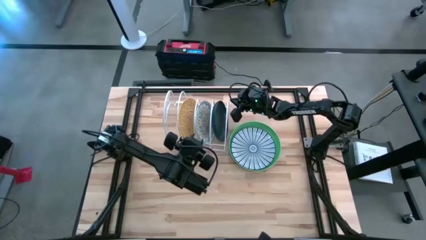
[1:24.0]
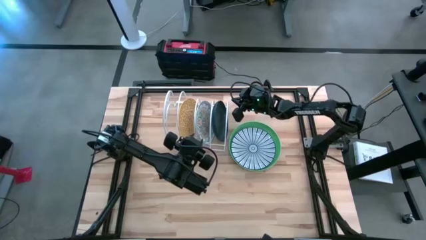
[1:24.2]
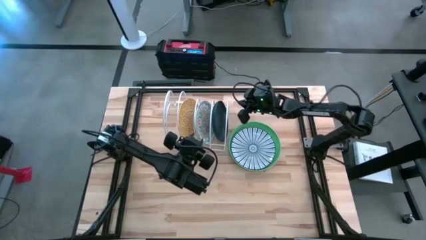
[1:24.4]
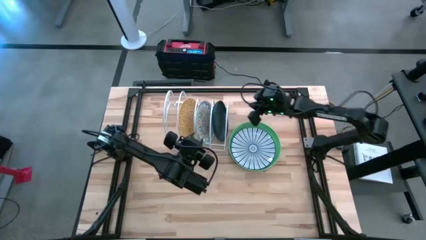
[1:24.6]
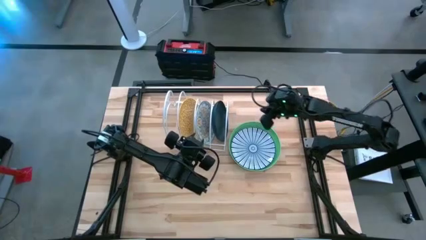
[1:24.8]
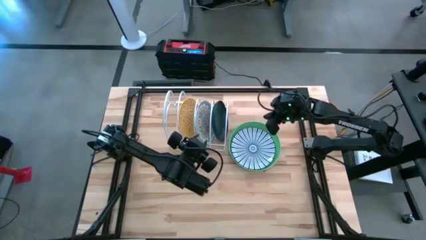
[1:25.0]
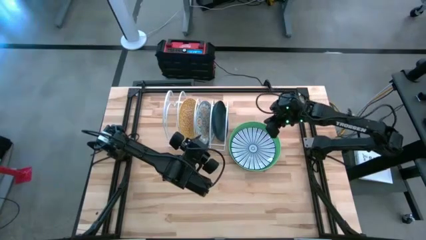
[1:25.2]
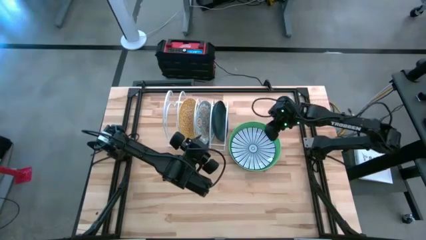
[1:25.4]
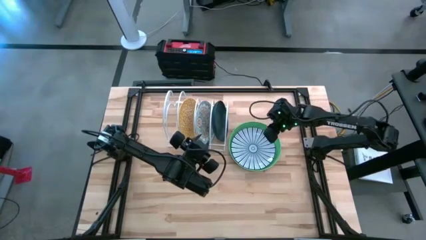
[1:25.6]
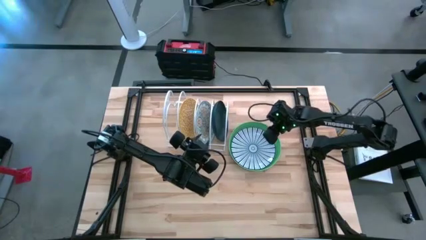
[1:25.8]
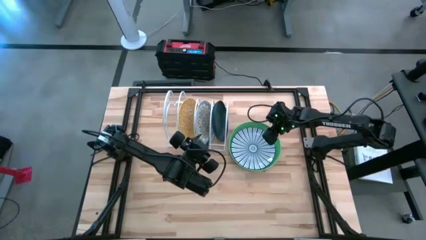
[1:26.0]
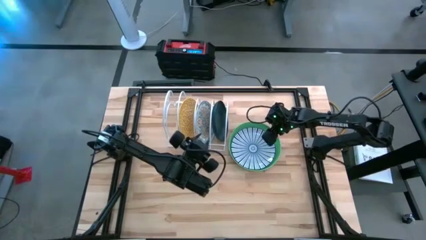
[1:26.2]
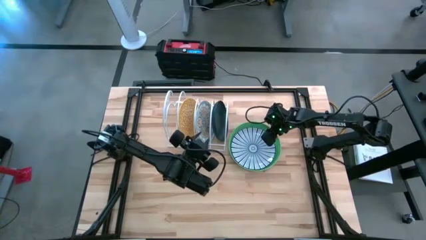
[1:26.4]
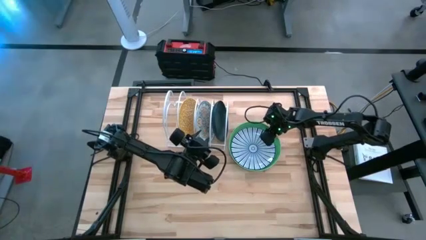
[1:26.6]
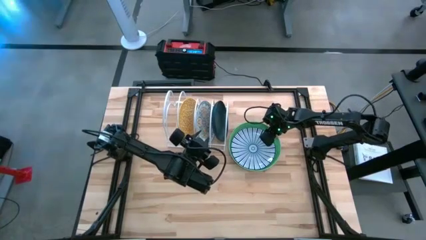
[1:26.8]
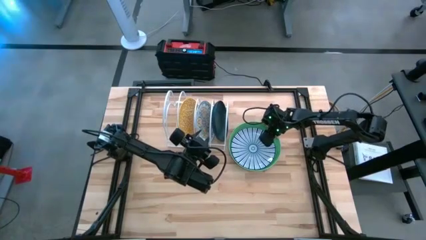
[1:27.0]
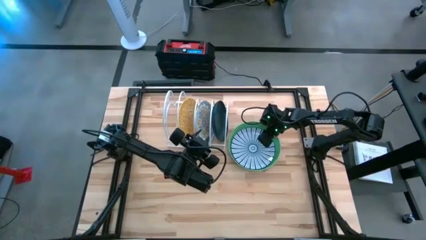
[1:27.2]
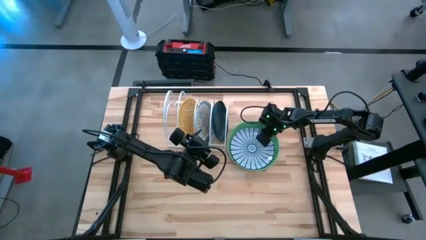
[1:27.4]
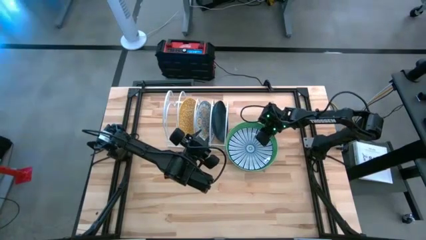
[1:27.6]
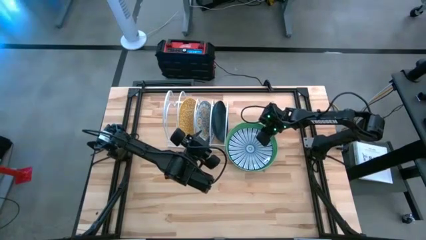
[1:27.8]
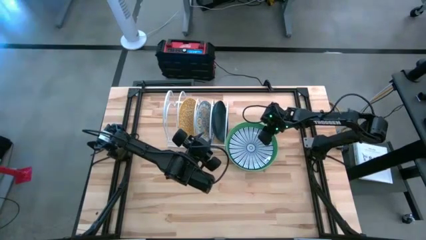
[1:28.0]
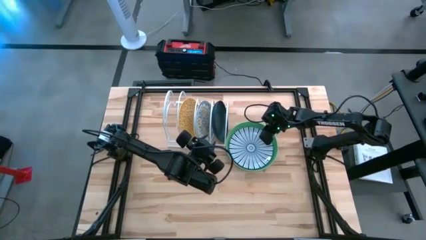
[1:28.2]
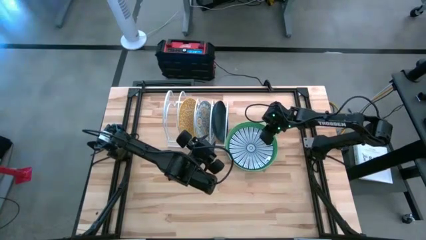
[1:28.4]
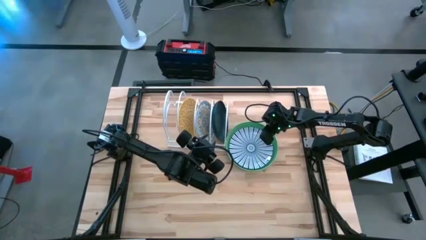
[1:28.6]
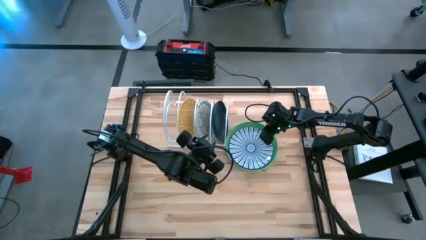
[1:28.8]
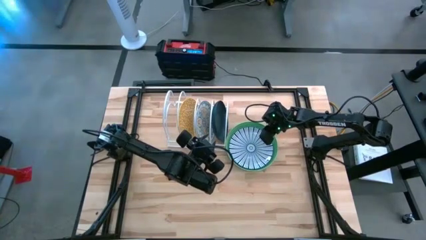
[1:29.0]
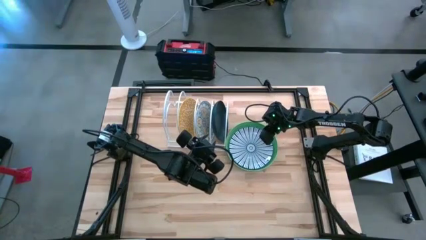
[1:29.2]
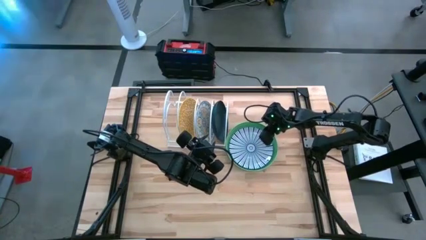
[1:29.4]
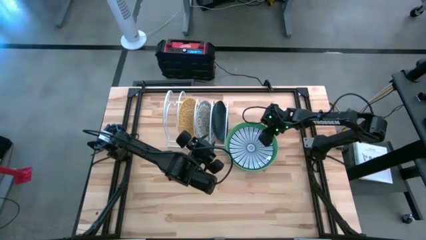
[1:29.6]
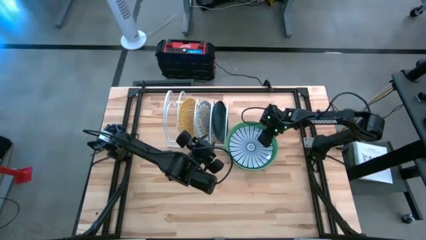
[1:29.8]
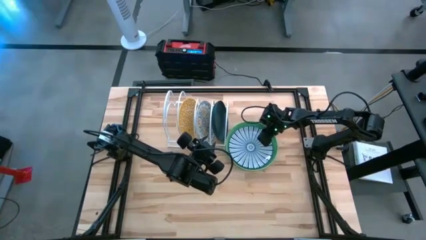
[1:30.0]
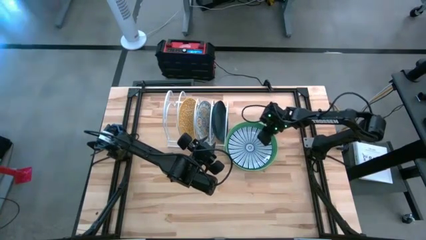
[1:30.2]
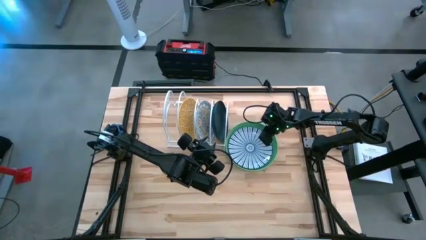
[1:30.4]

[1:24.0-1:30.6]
Task: Sort dishes
Put the blue plate in the dish rack

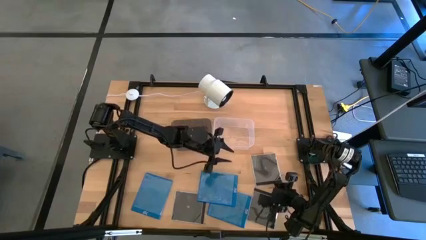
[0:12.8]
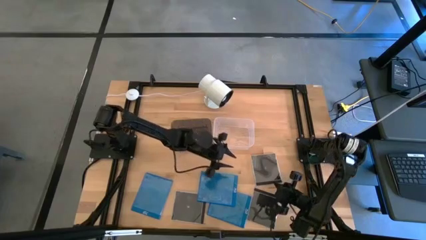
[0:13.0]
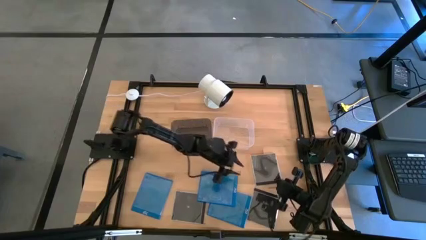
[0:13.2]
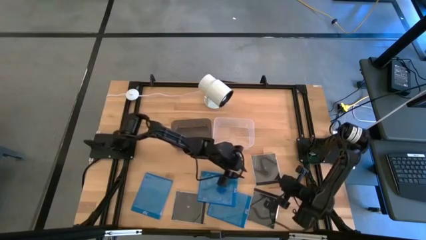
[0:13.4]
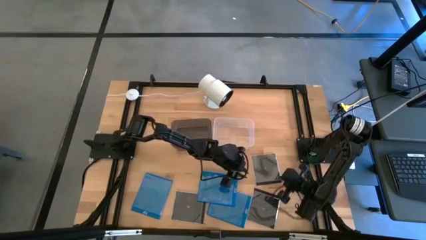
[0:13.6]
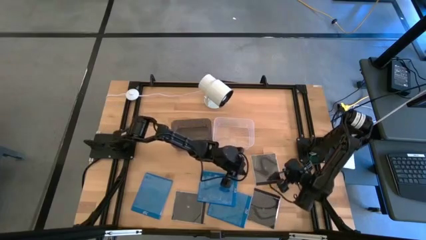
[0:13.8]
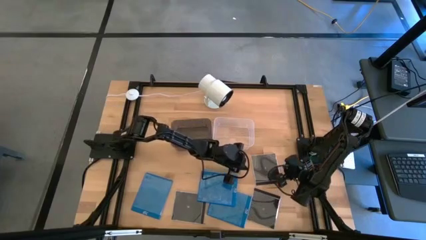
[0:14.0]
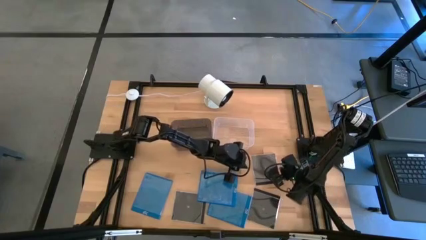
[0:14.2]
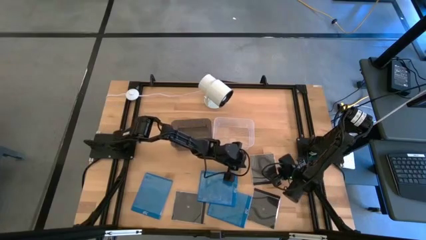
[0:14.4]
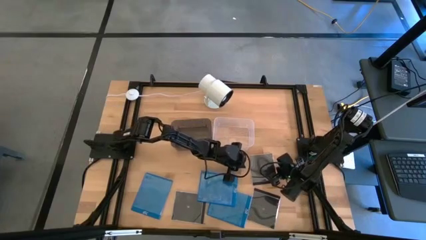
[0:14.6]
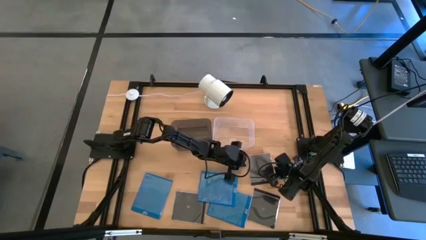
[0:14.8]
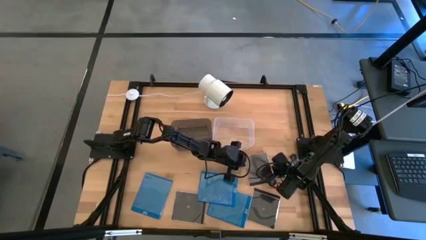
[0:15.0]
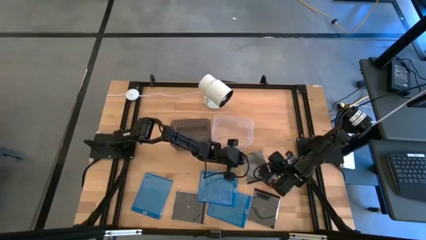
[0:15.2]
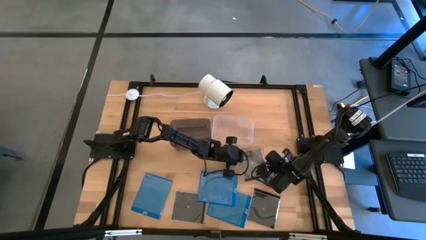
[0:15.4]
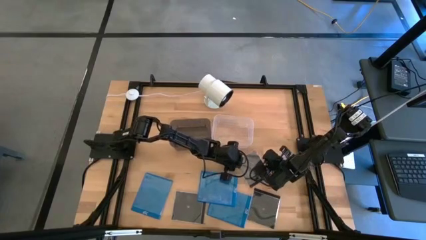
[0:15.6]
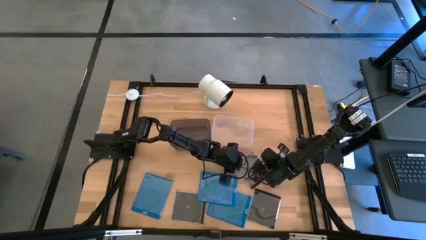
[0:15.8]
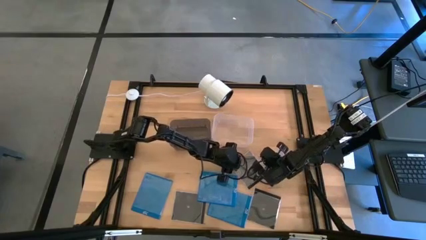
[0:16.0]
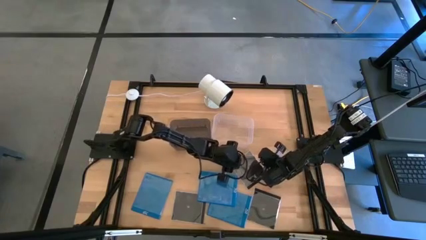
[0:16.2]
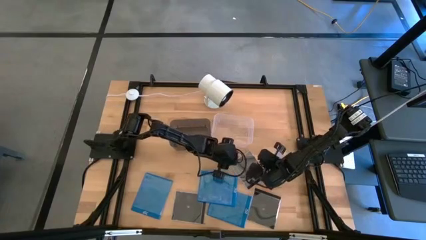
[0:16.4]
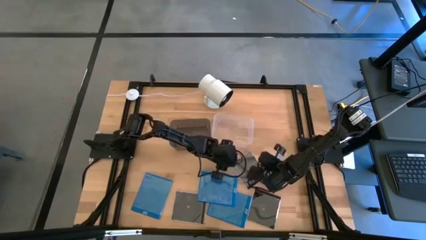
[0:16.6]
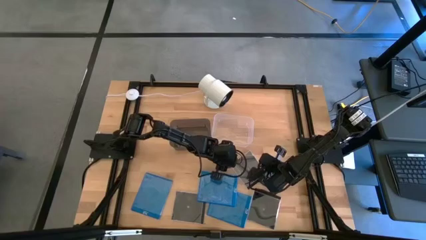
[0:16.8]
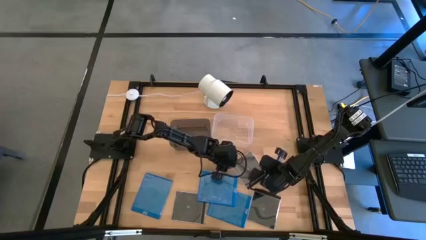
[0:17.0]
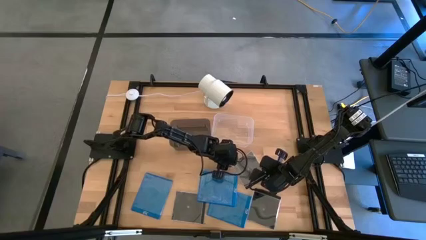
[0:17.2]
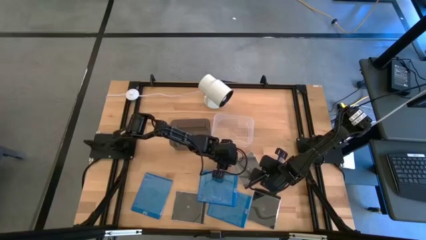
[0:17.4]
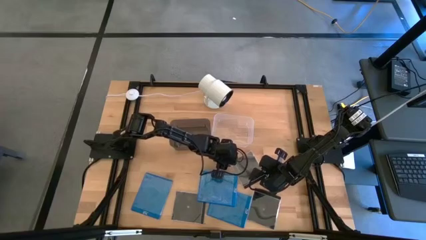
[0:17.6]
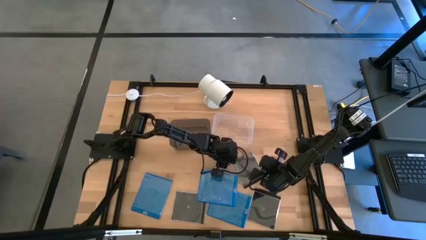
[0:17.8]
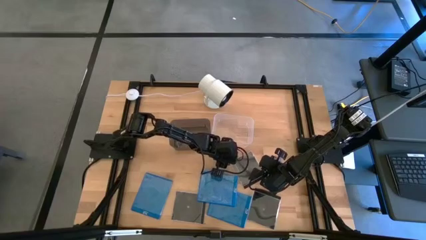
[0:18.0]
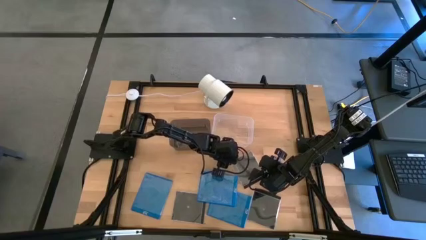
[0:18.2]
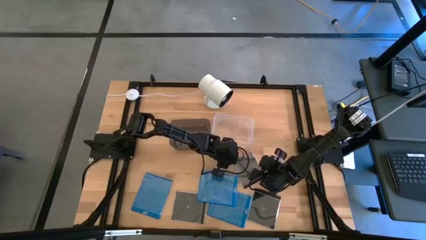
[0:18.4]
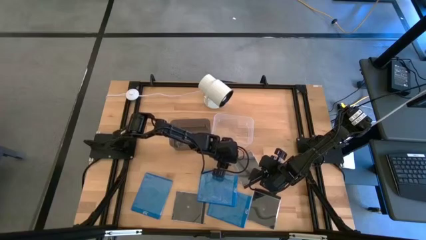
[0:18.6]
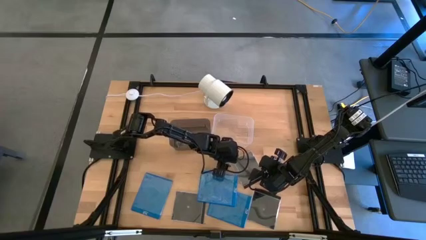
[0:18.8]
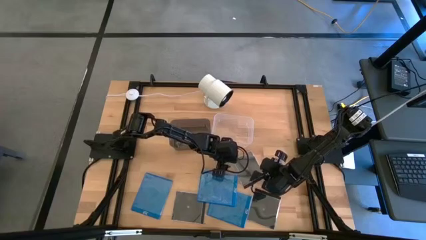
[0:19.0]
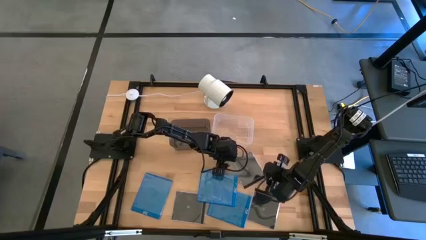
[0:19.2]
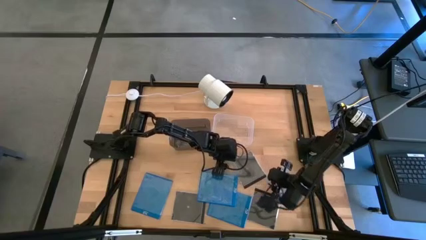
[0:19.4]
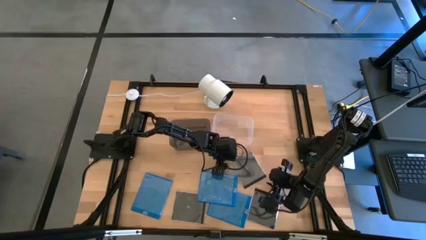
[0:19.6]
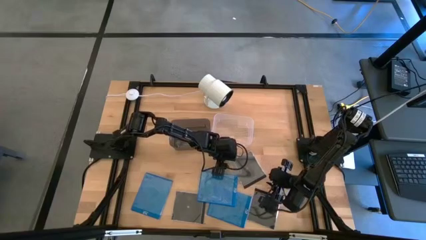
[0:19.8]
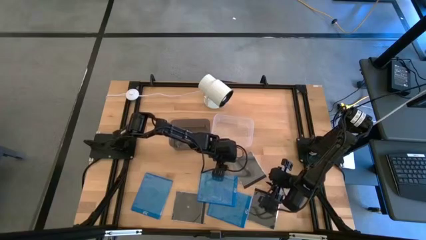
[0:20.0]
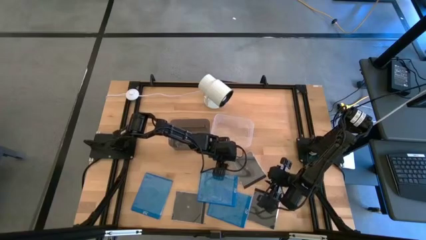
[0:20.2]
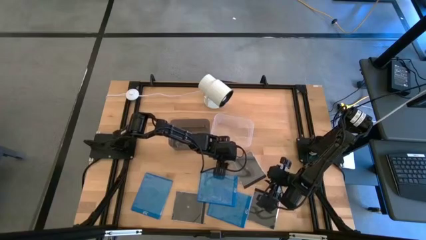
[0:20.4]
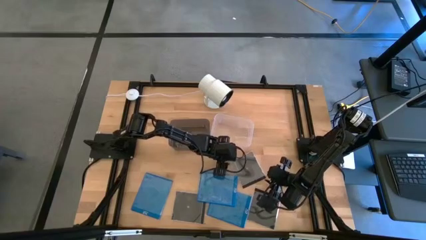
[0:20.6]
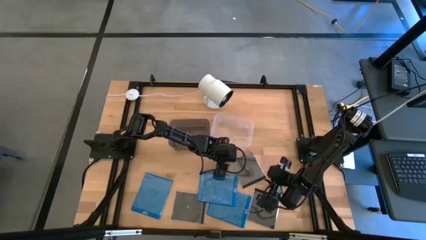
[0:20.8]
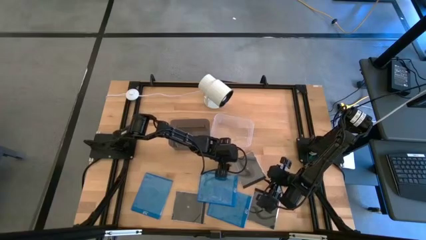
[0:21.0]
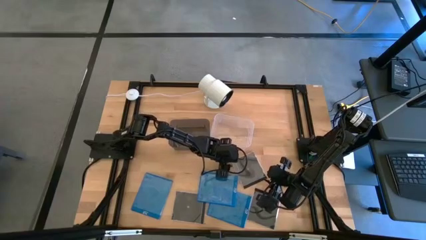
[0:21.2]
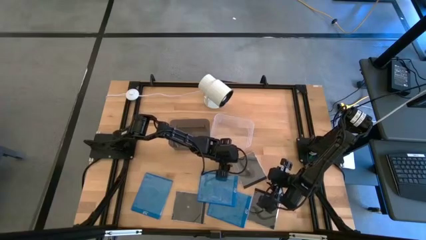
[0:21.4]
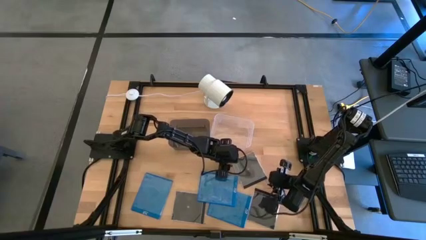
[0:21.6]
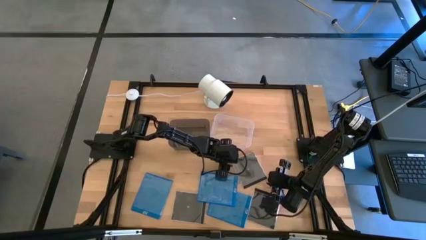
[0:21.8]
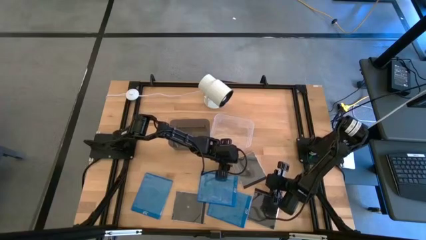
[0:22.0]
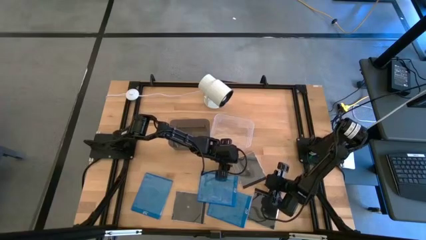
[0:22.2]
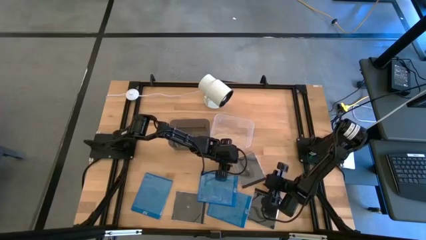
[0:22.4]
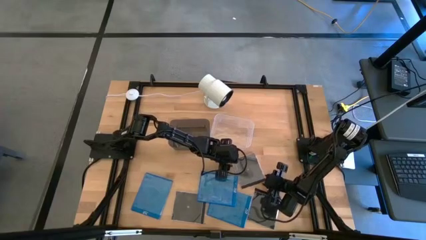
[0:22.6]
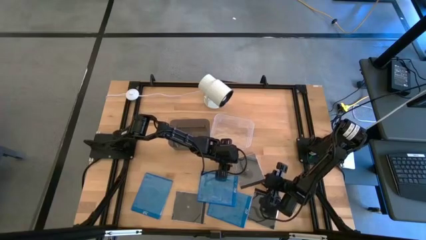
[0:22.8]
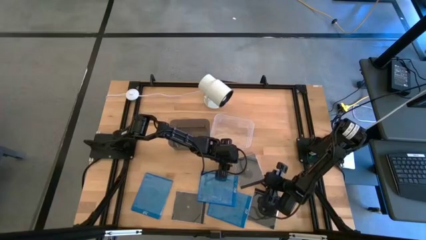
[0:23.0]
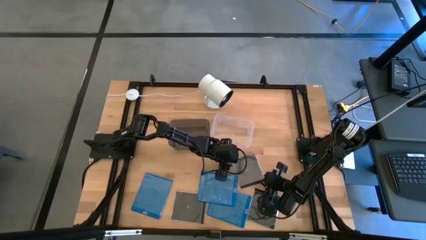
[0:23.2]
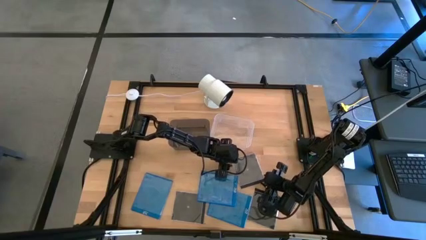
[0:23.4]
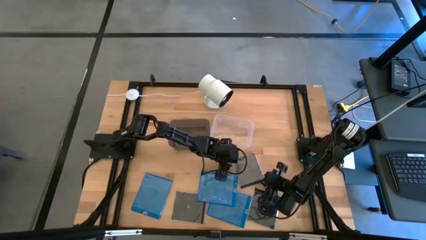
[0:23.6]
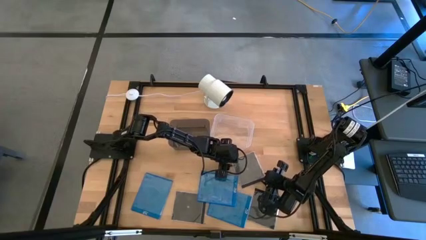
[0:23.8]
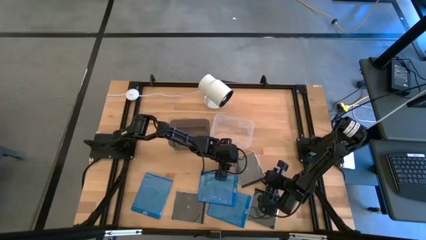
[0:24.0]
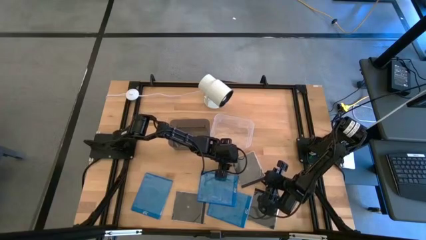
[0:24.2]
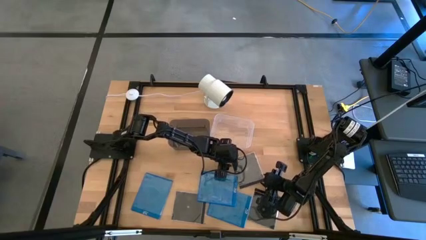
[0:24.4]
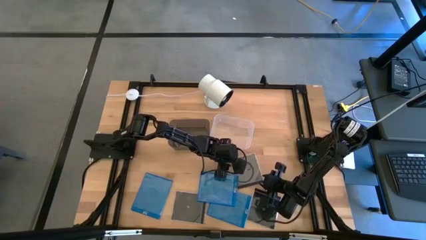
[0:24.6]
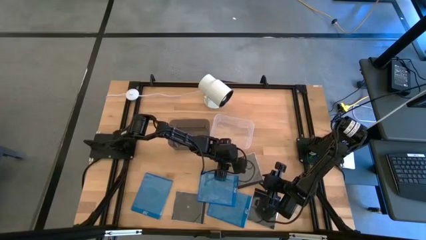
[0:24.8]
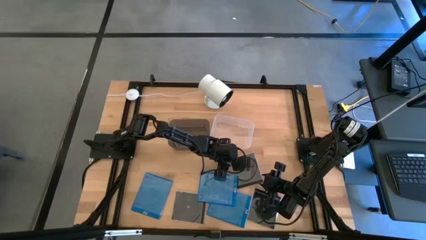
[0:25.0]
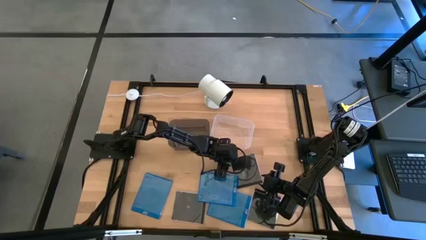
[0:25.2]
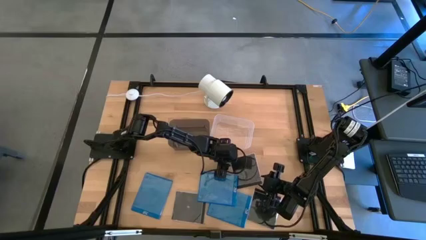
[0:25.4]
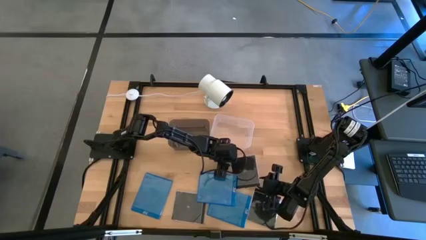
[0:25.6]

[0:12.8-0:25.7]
Task: Pick & place jewel cases by type
Put the top right black cd case into the transparent bin
